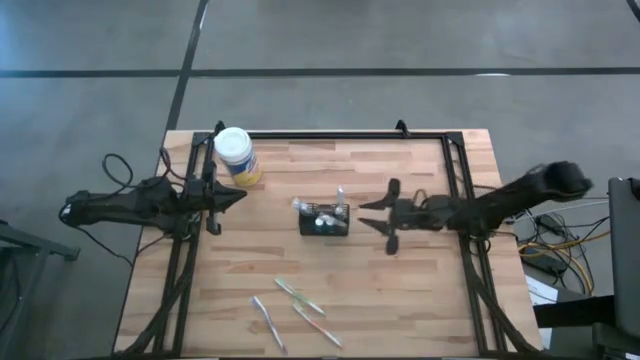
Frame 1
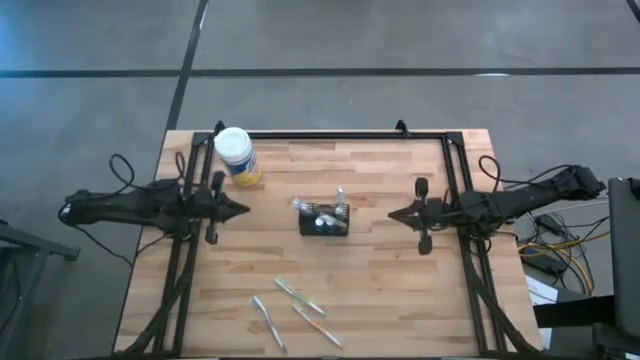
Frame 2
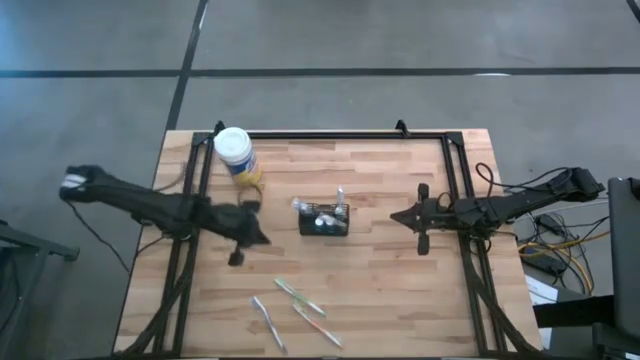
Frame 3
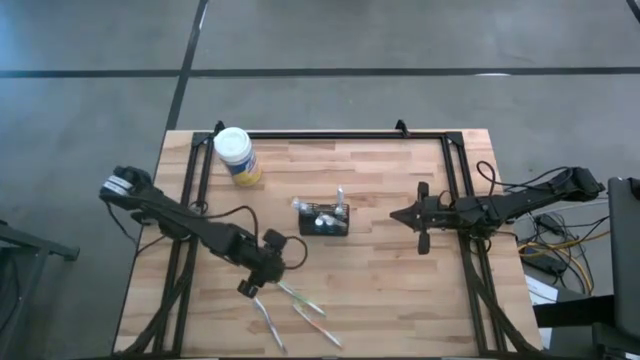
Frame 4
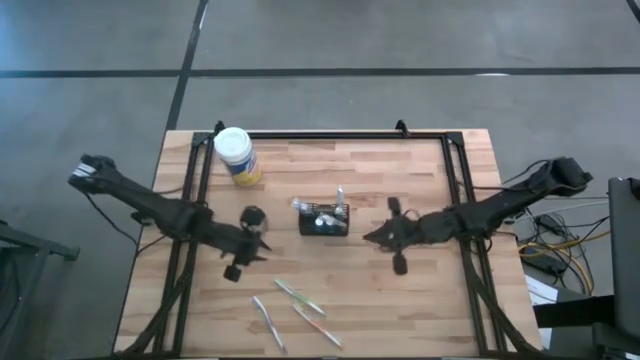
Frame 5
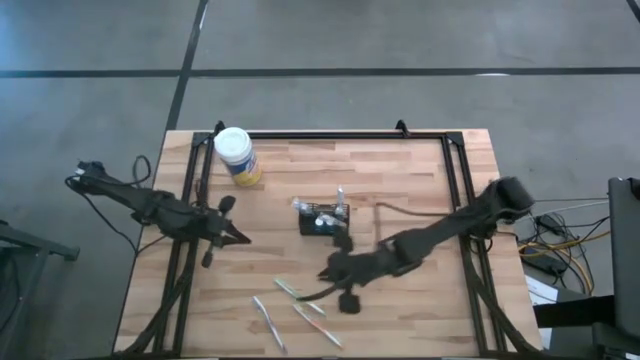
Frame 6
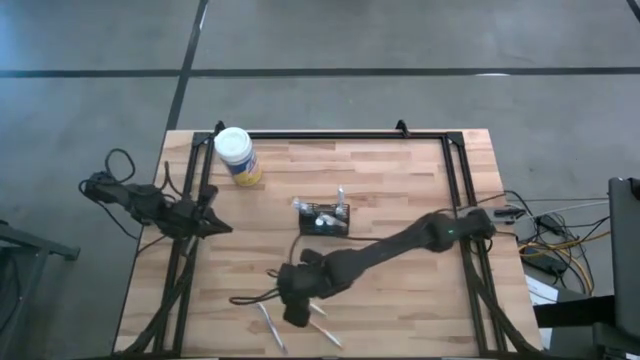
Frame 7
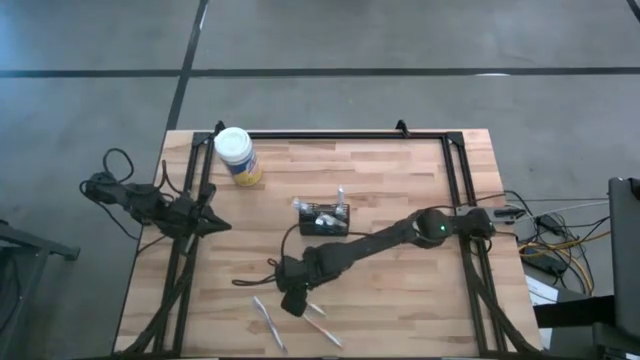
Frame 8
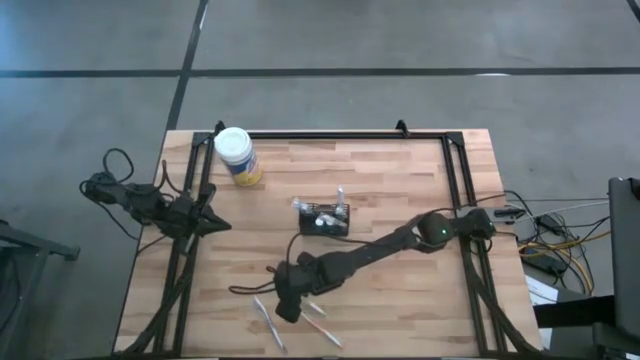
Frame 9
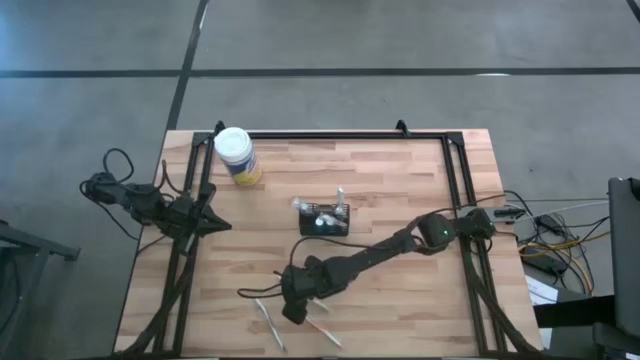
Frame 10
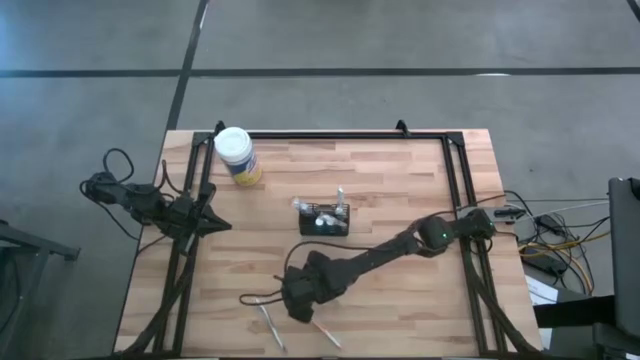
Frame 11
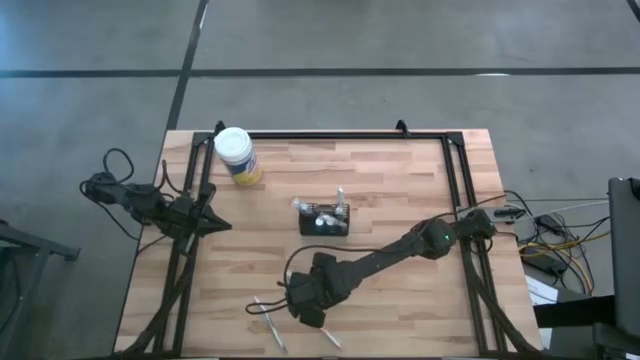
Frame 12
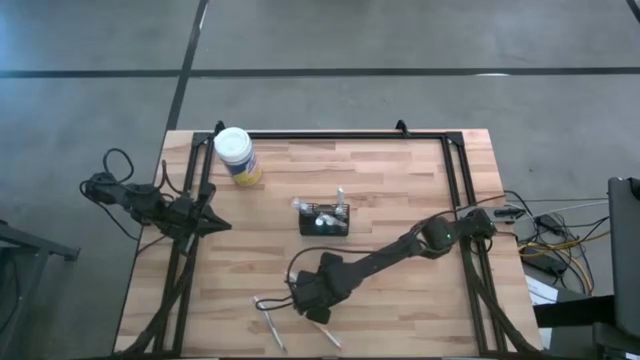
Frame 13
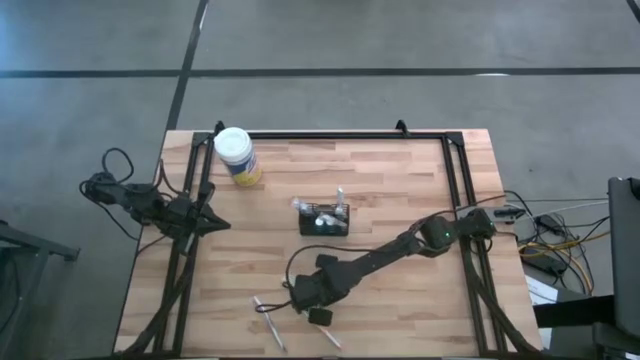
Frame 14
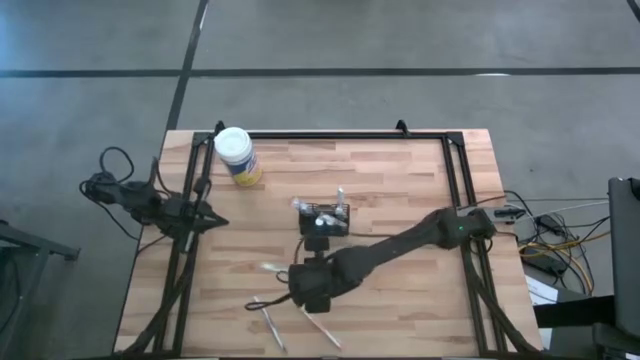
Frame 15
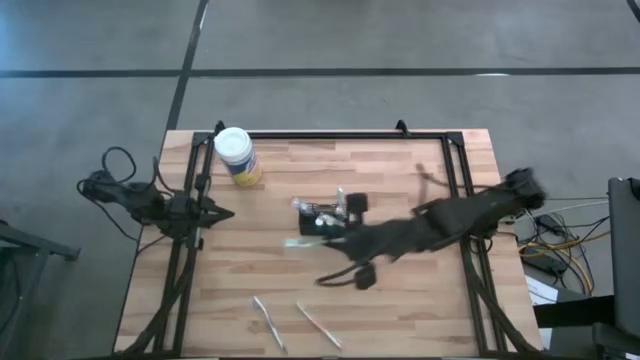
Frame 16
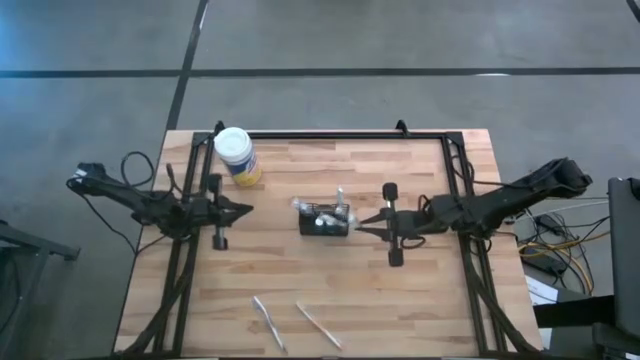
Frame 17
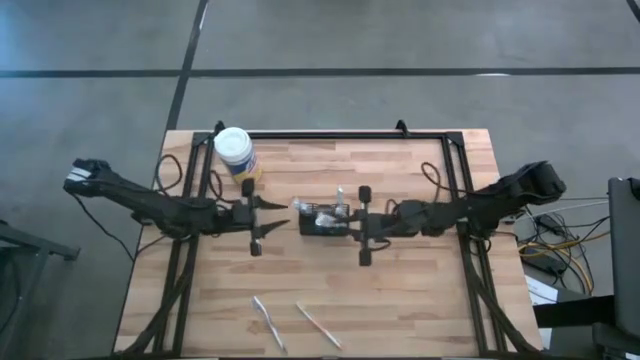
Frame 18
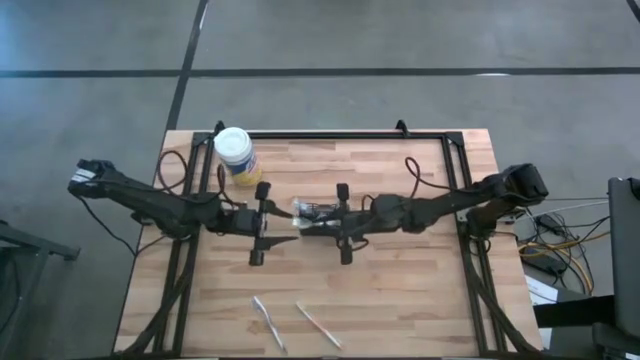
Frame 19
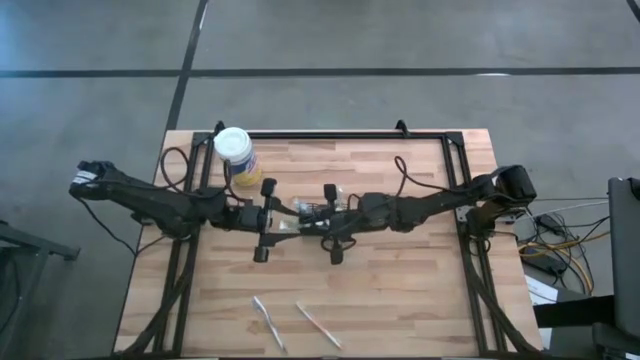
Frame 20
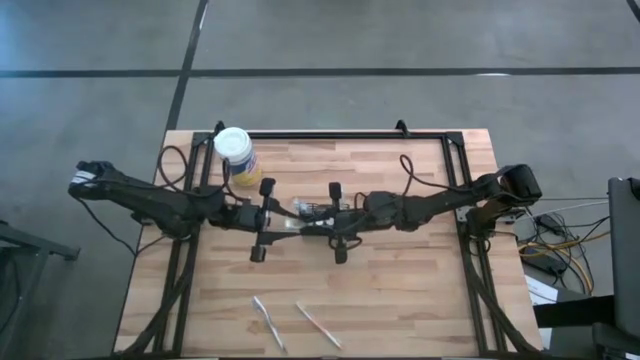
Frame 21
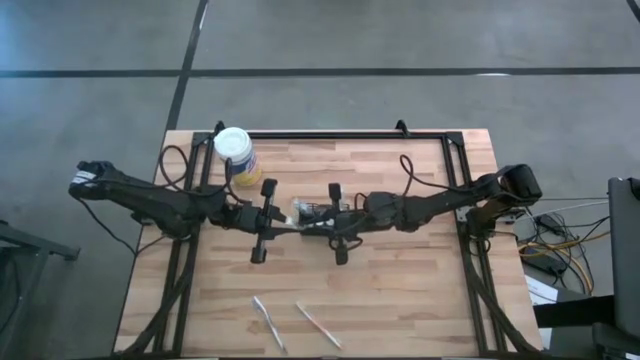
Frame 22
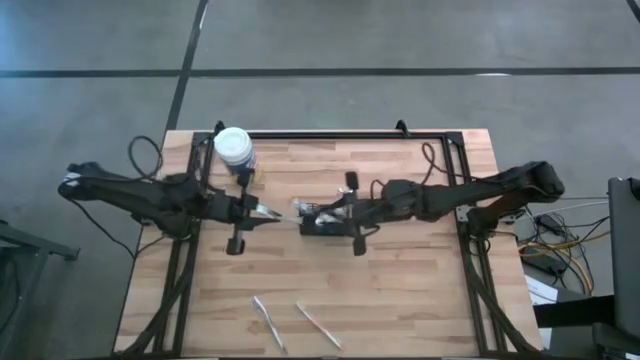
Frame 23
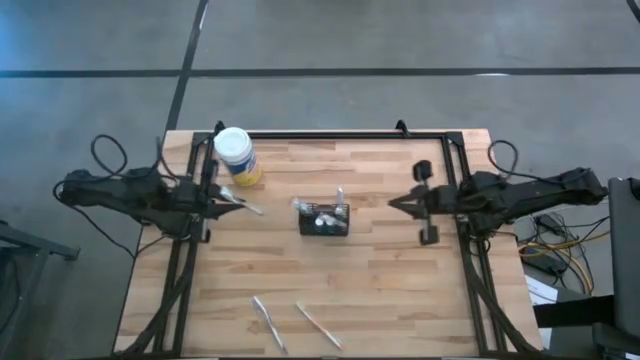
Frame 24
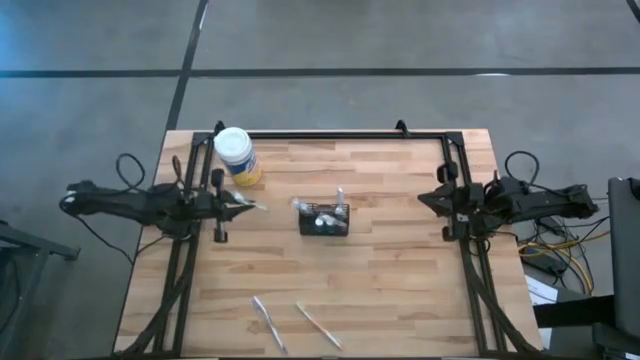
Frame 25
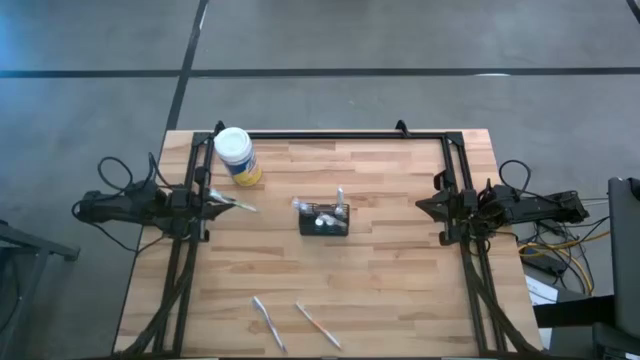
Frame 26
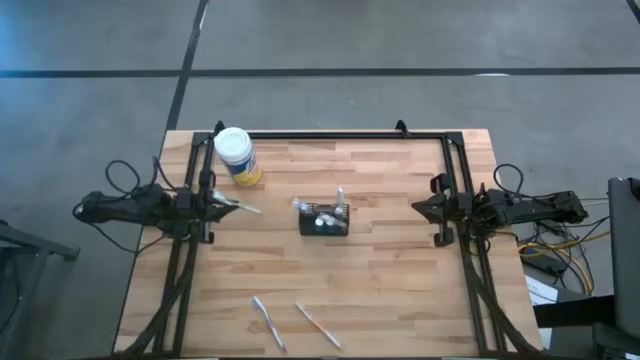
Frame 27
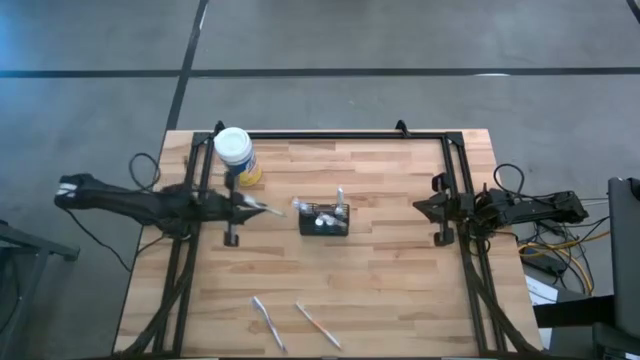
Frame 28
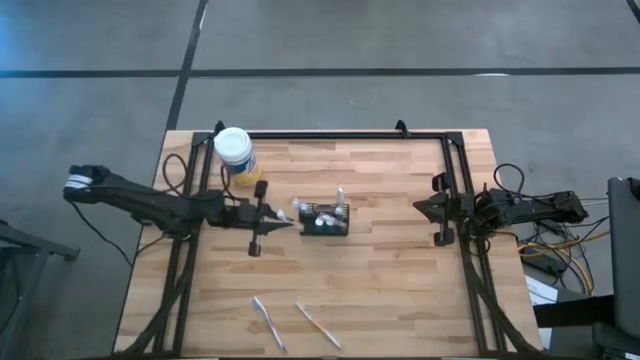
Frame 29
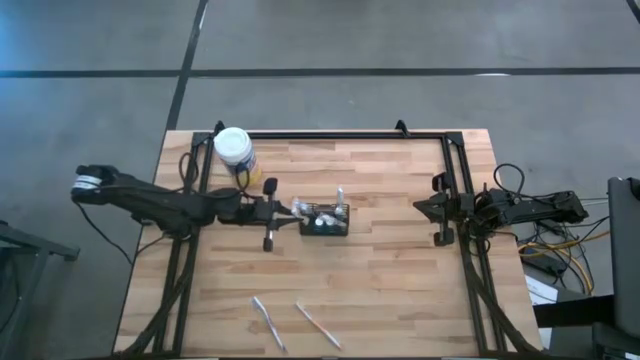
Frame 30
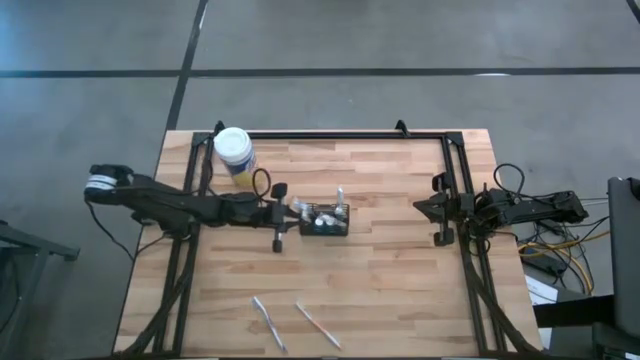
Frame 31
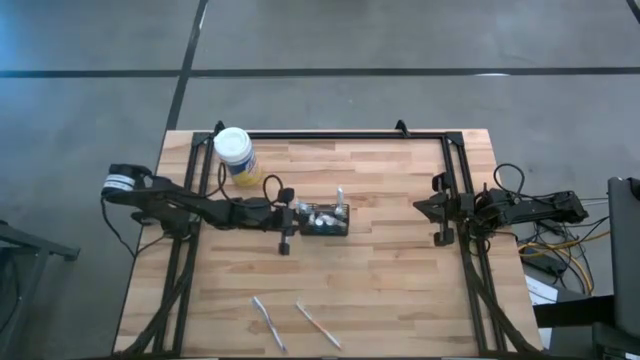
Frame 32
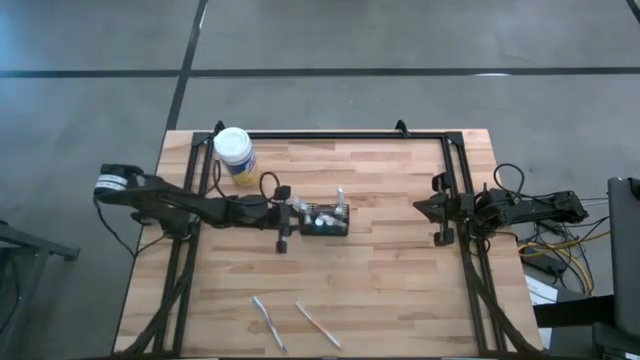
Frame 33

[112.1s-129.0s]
Task: Pick & Place toothbrushing station
Put the green toothbrush into the mesh organizer

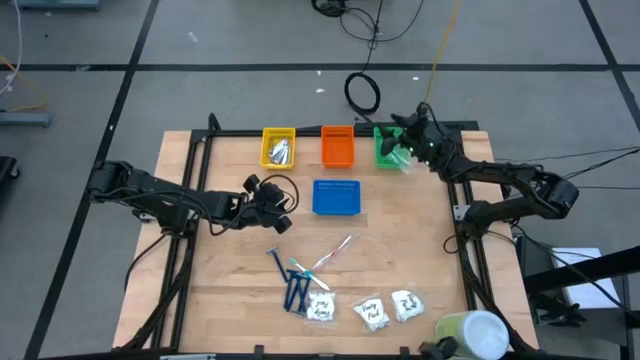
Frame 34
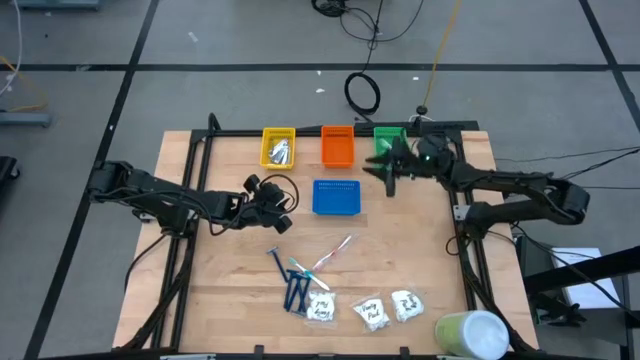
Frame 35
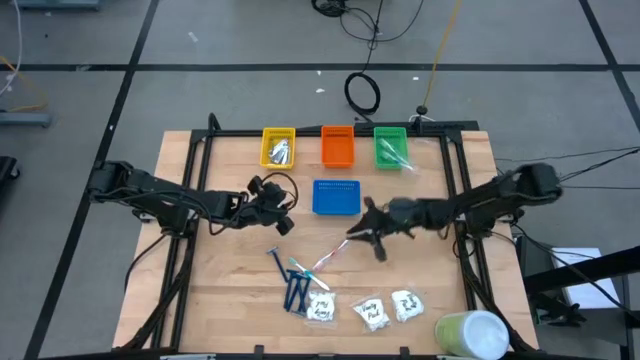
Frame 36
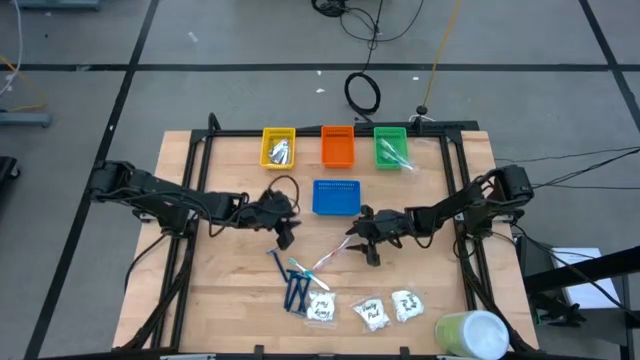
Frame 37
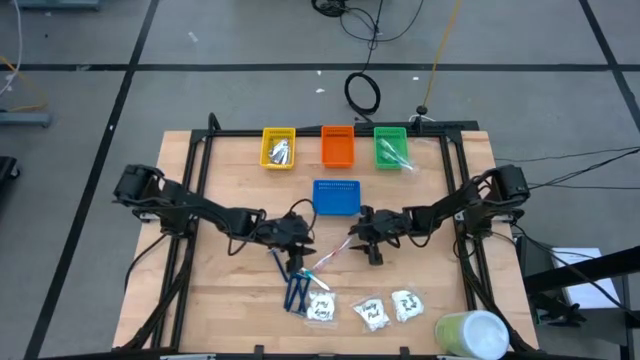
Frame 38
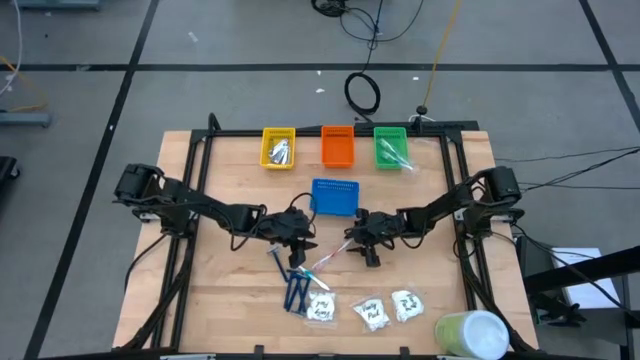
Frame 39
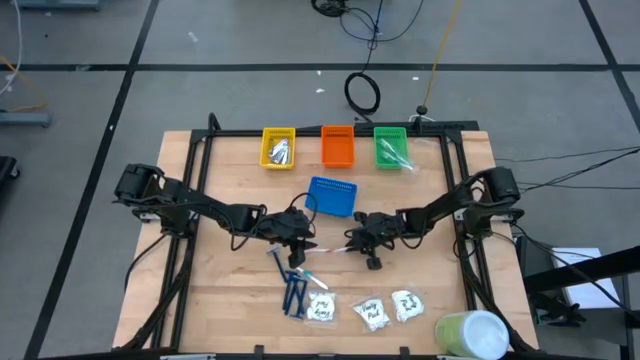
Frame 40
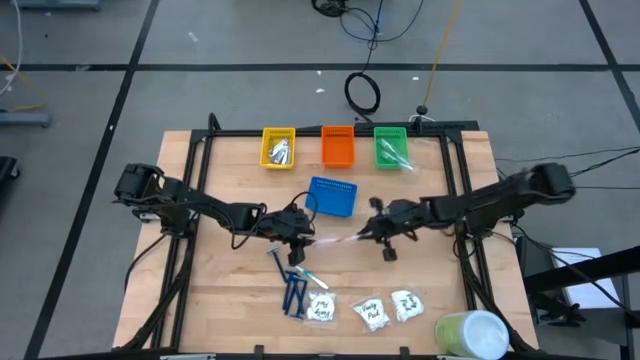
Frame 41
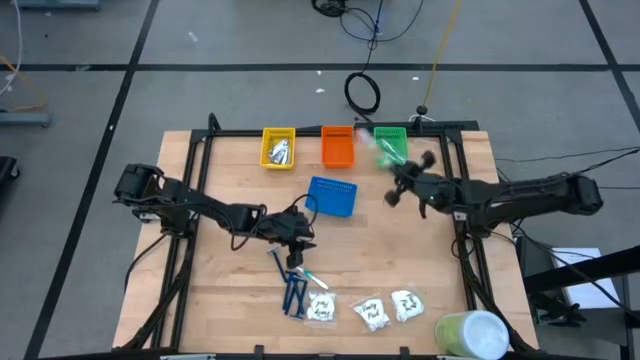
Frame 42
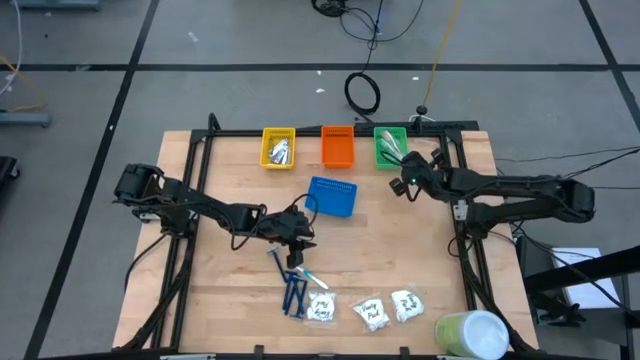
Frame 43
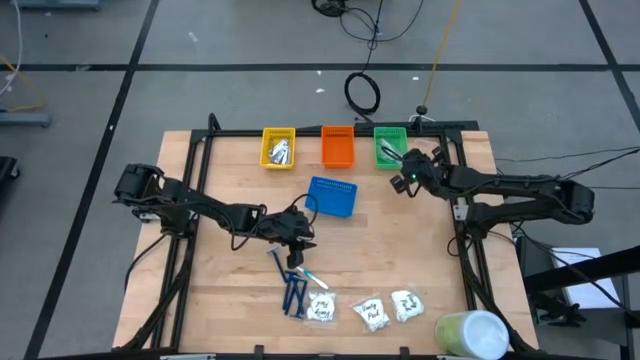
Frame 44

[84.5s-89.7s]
Task: Pick & Place Travel size toiletries
Put the red toothbrush into the green basket

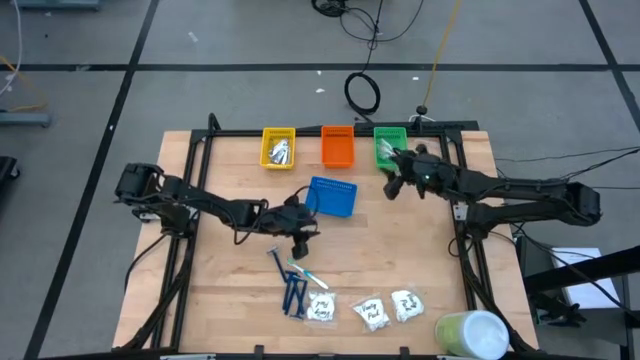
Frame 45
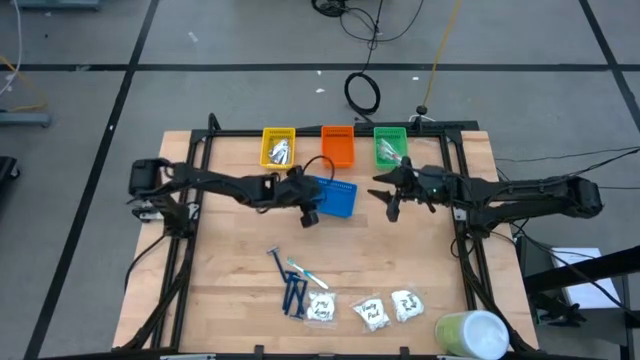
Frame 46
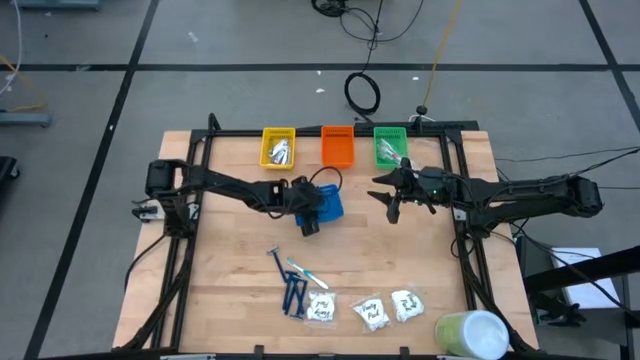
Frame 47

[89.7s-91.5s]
Adjust the blue basket on the table
